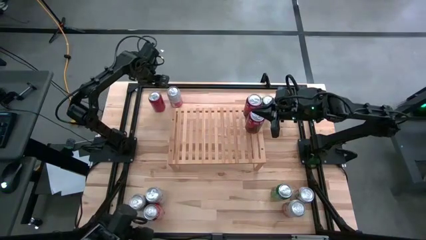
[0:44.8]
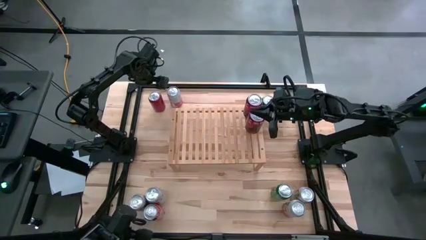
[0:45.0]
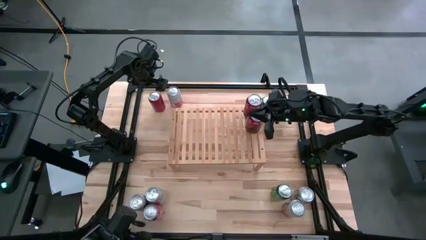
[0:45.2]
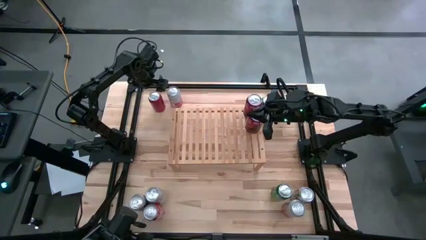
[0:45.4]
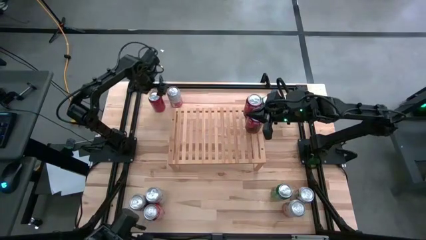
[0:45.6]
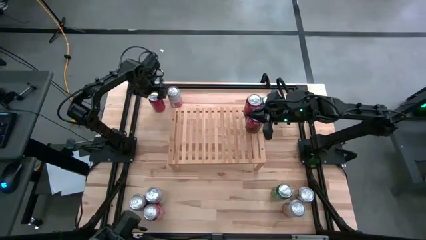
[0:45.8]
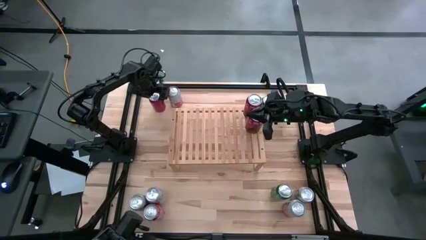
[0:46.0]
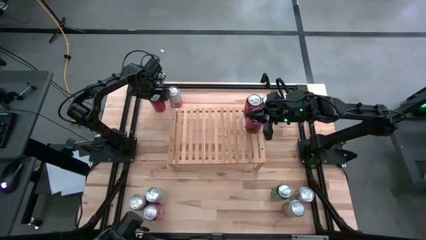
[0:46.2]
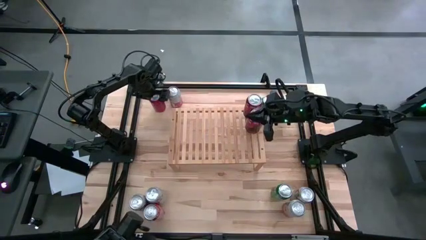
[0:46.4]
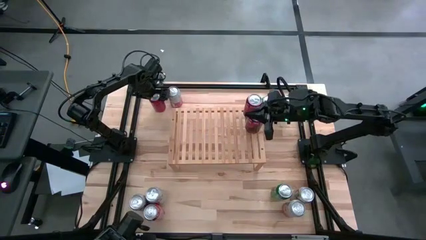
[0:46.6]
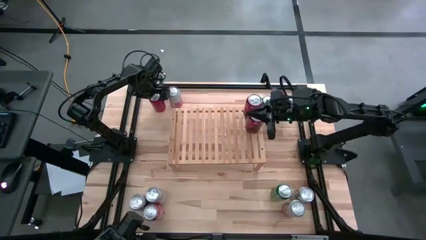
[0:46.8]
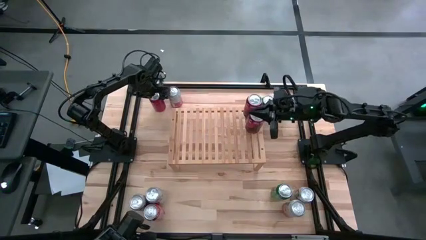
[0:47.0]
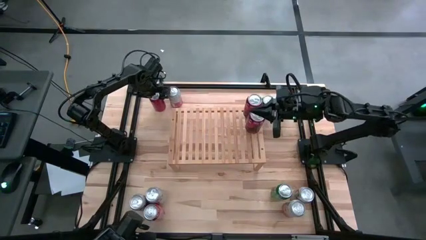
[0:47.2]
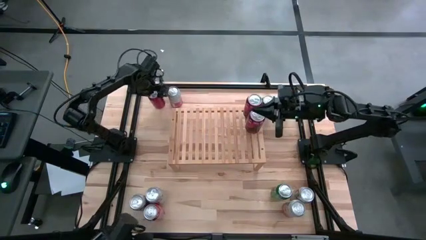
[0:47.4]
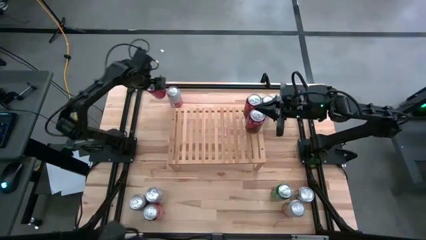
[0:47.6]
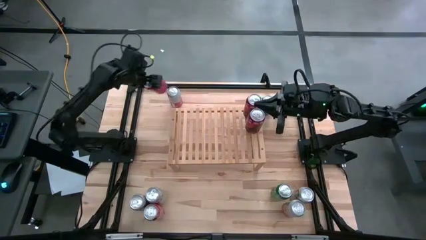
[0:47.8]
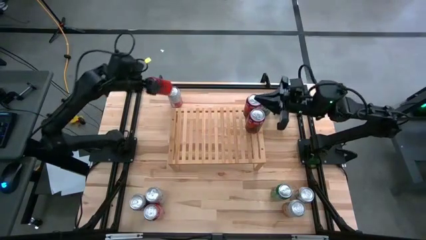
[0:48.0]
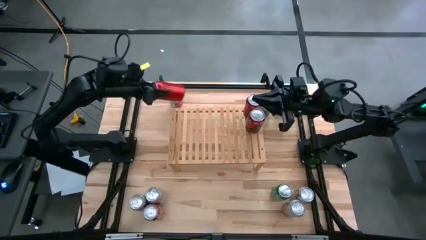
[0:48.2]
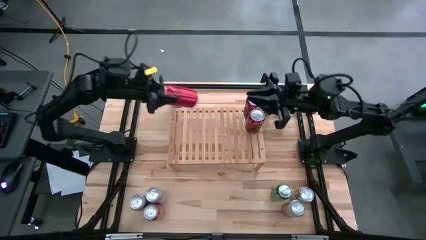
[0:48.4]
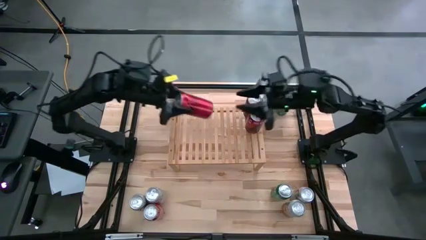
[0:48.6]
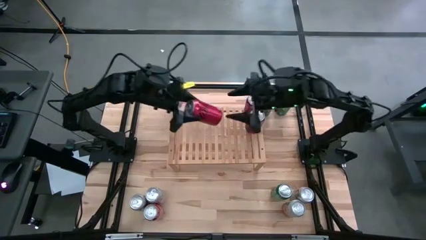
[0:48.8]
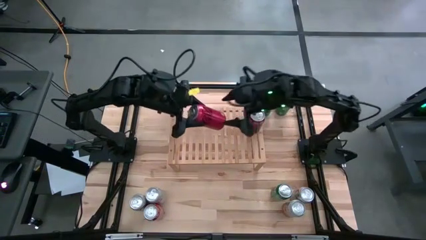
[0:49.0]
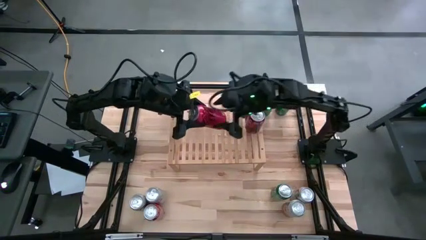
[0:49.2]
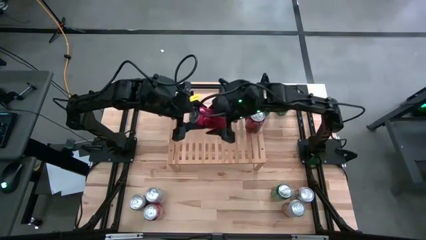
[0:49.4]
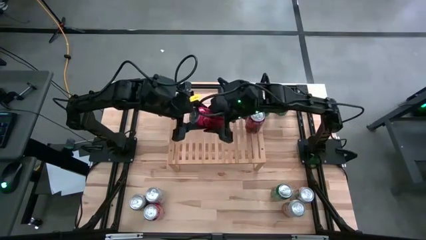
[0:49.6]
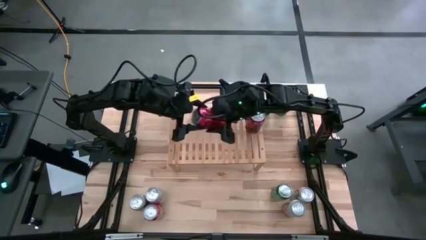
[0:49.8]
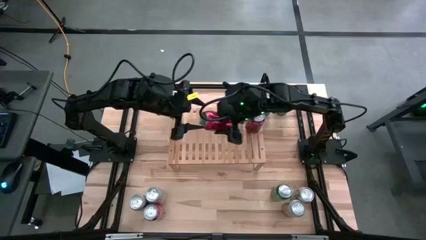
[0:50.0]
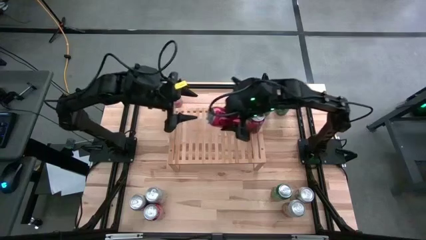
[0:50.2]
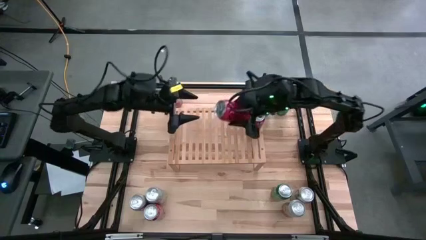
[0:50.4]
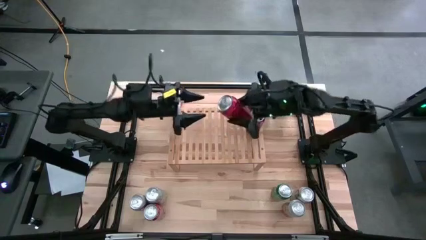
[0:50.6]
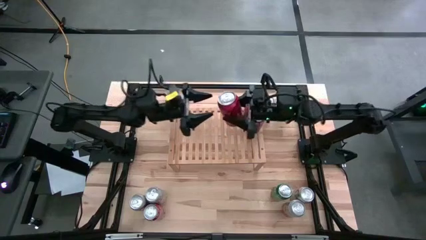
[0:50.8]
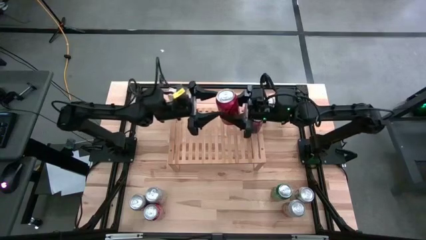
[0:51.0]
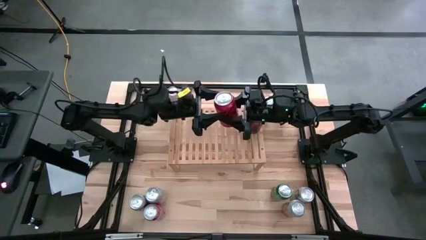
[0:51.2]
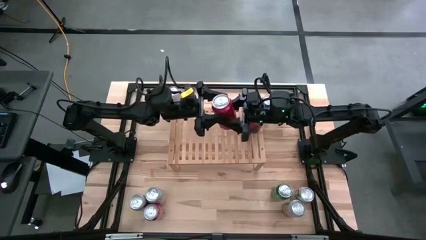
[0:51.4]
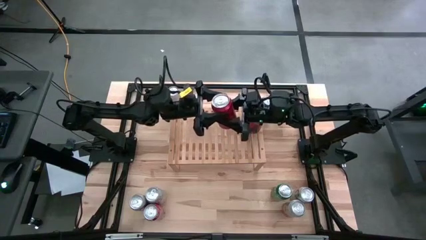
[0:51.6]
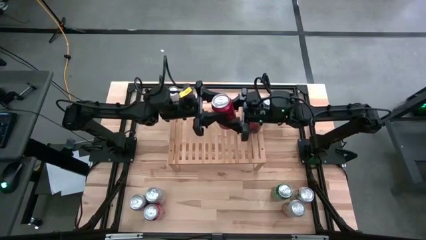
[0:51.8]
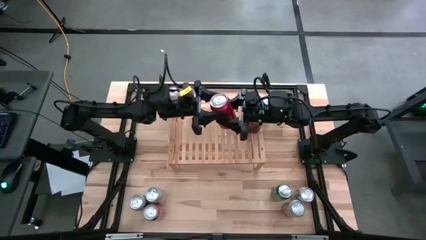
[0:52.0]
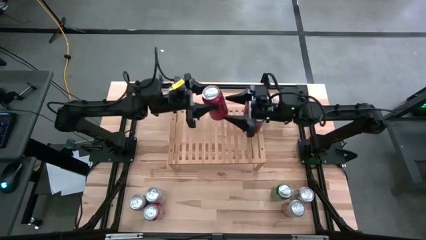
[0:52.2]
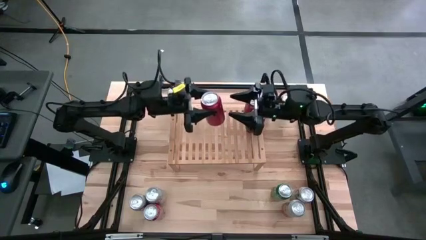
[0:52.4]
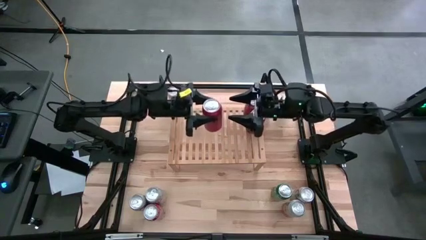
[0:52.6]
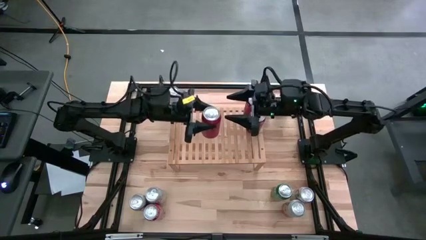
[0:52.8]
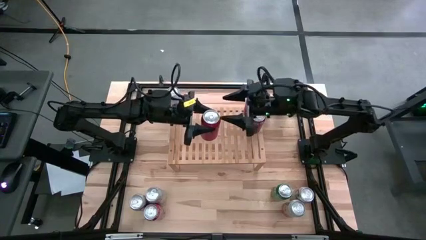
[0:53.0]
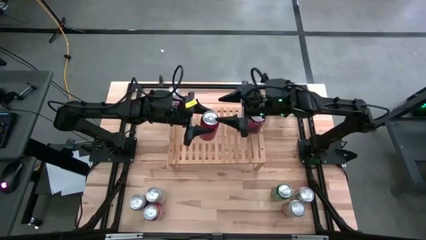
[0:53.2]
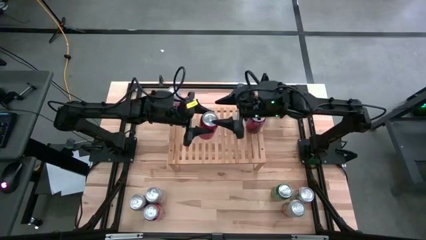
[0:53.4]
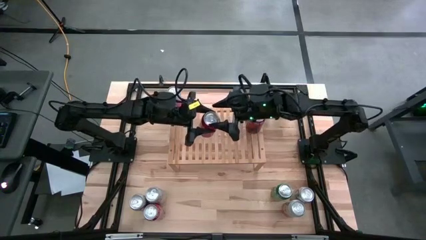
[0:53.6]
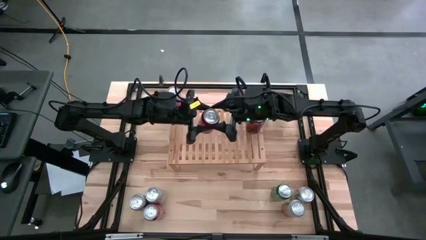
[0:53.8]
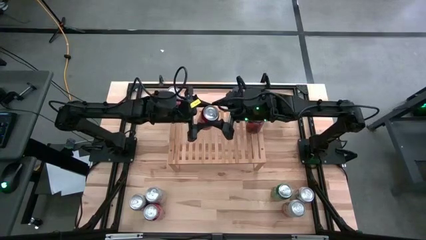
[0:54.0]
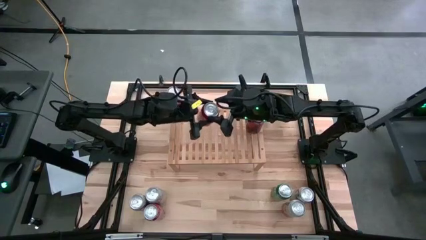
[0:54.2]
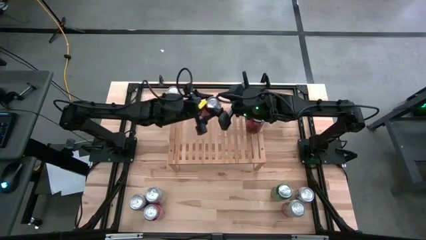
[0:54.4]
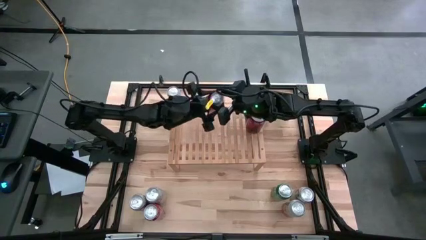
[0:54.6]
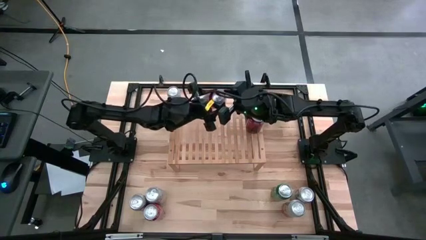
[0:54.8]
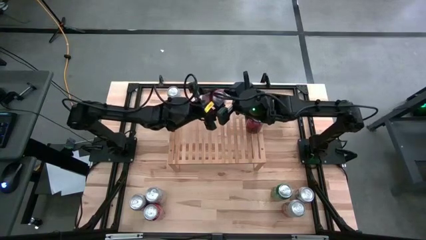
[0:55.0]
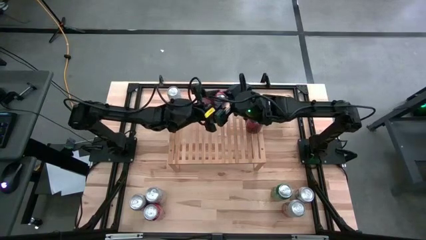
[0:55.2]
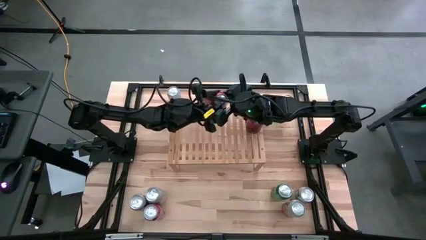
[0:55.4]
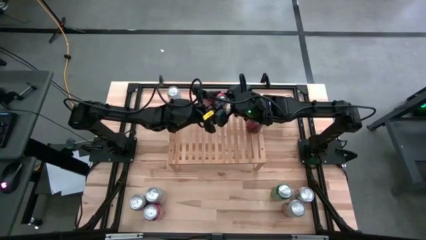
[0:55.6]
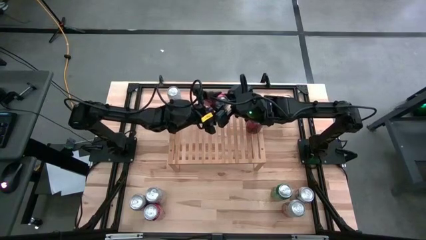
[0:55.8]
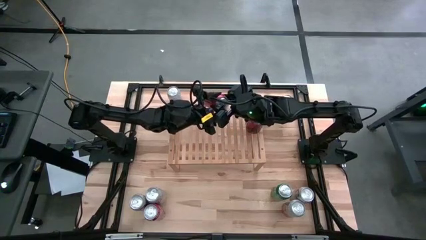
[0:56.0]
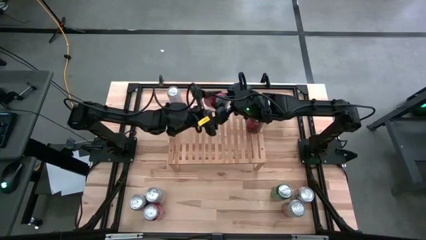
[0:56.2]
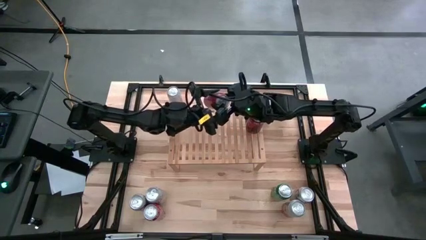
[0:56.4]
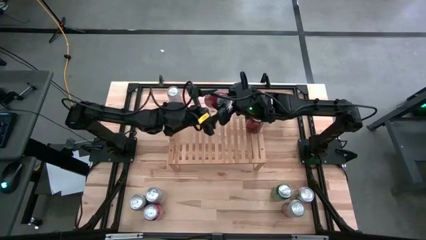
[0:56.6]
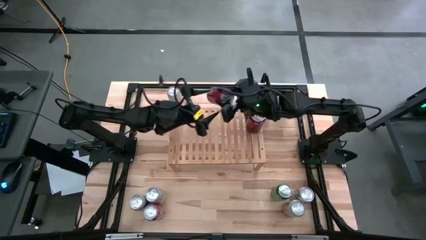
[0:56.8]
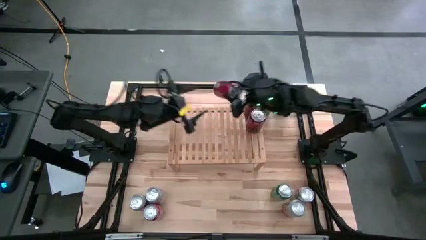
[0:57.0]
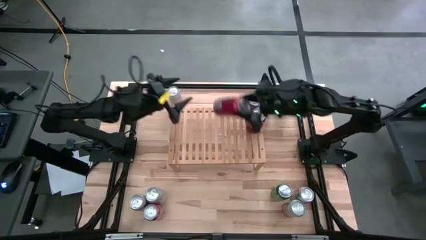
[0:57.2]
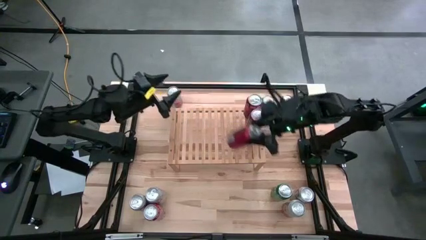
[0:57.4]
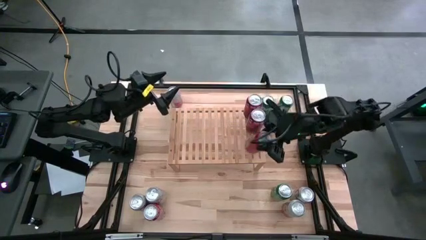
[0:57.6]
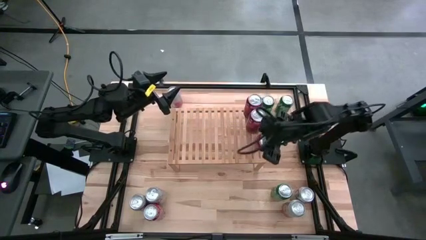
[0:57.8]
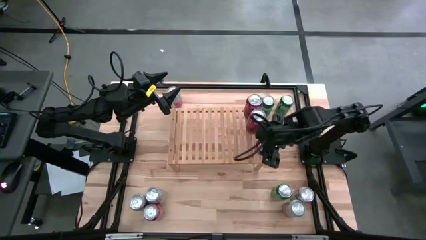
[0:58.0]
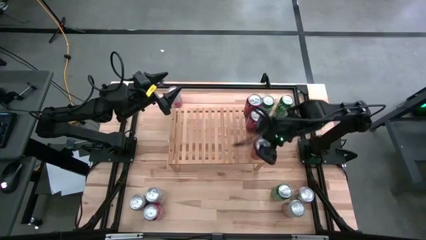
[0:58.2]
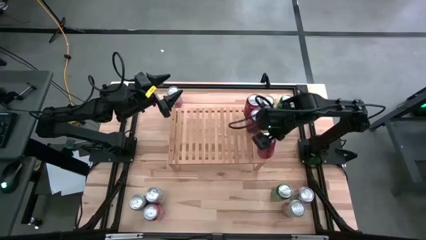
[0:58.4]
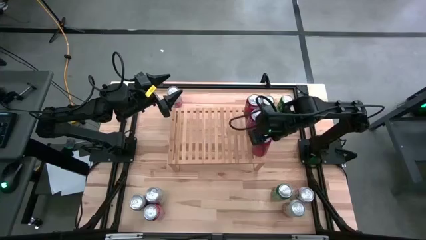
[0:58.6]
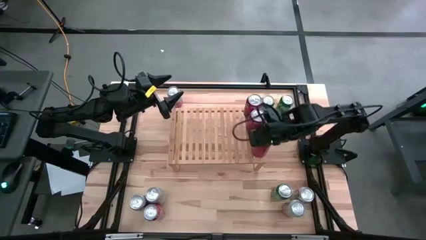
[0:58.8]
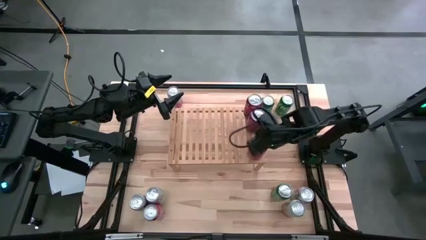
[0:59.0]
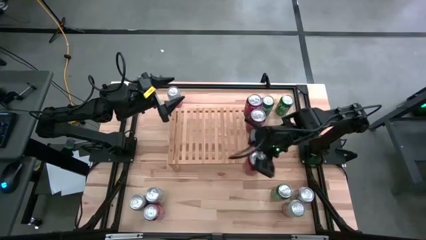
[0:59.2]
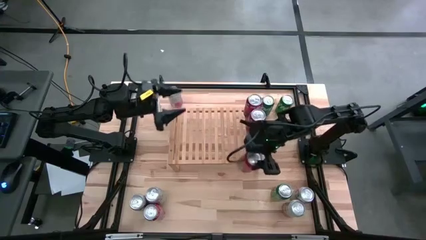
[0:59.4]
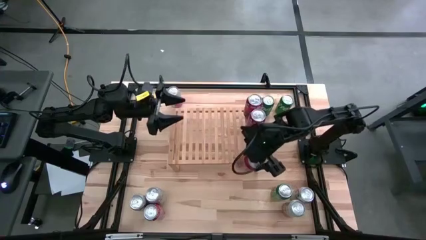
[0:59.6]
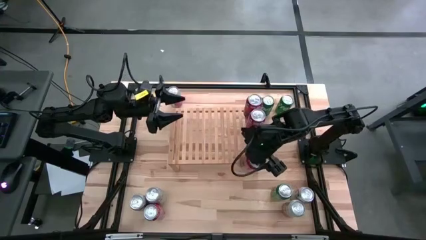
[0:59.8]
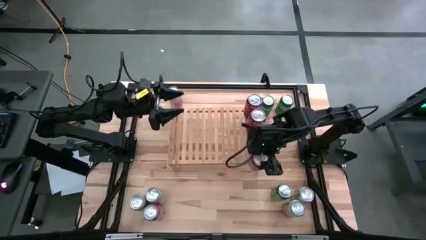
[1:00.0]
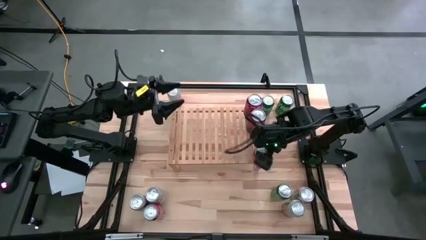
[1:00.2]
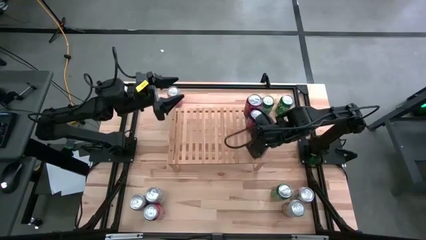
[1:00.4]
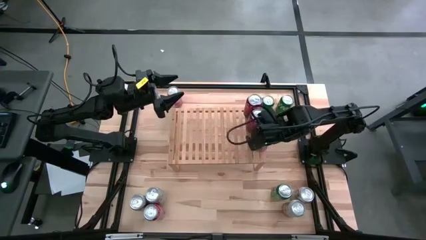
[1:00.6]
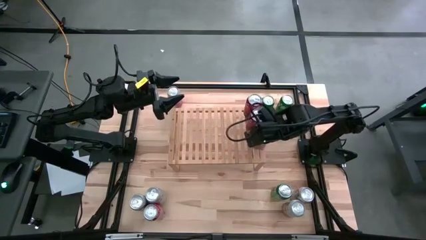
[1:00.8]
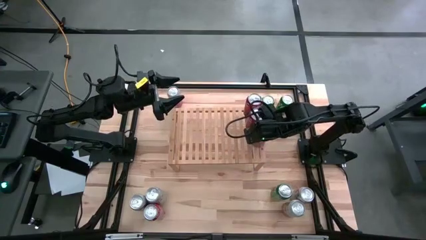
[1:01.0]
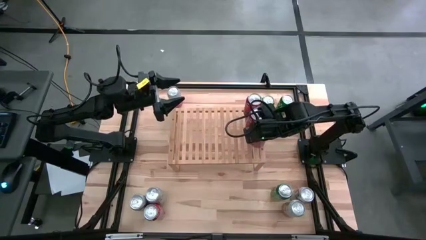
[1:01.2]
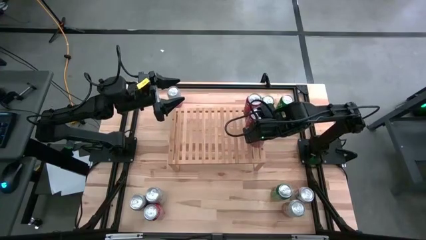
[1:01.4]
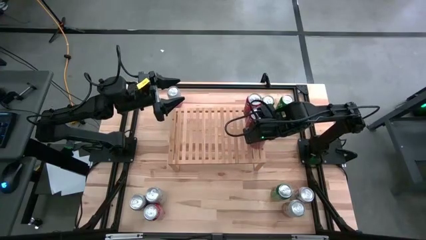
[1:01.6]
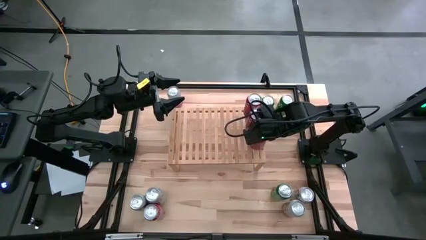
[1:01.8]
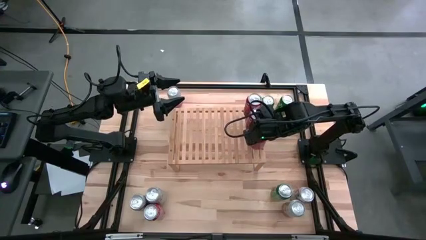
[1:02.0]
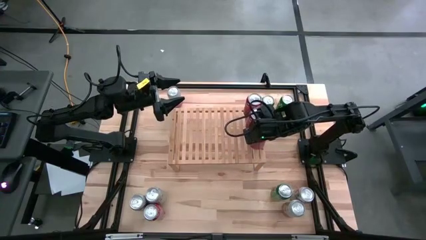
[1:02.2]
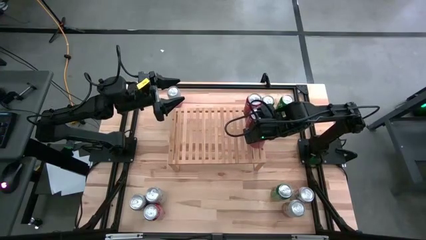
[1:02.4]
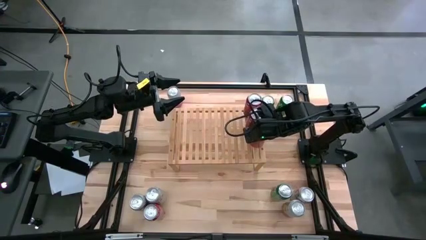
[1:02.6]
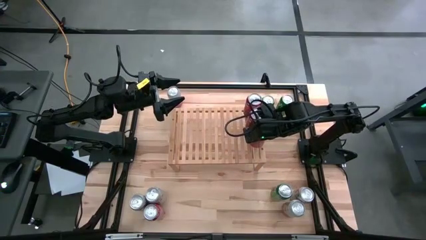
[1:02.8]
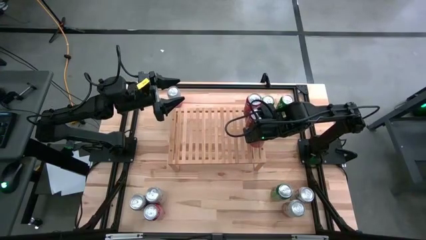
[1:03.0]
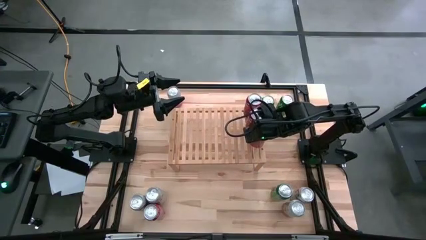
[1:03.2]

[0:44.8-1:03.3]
Task: Place canned beverage on shelf
Put the top left red soda can on the shelf
